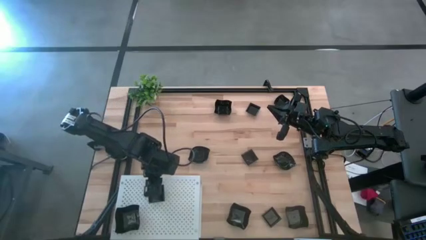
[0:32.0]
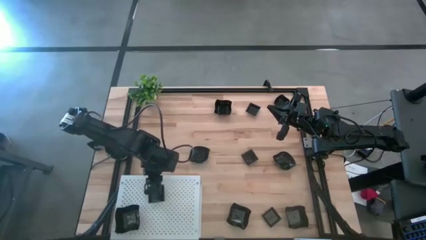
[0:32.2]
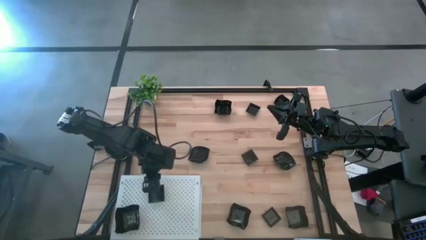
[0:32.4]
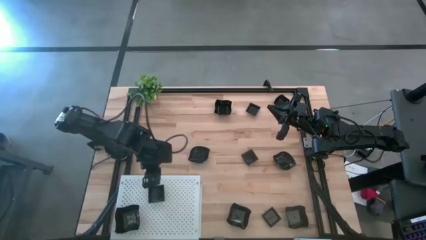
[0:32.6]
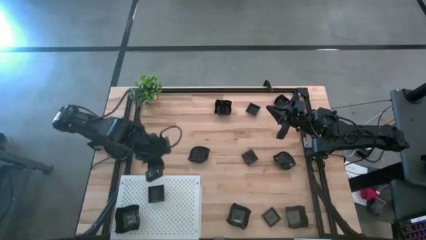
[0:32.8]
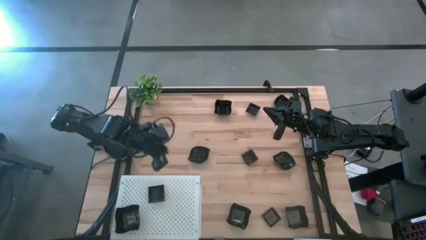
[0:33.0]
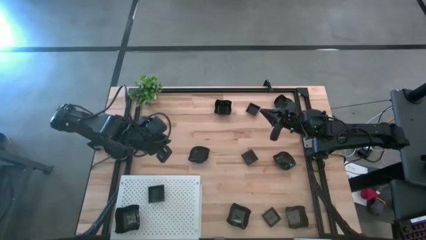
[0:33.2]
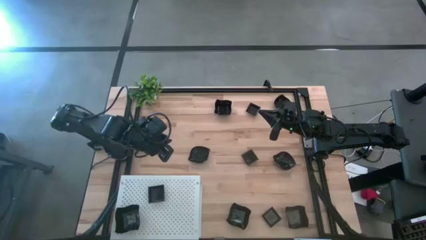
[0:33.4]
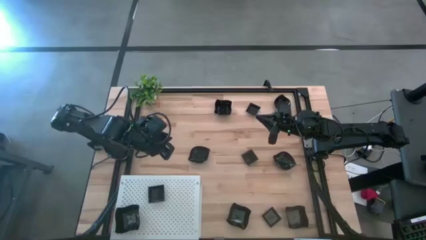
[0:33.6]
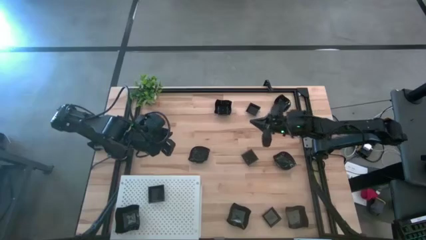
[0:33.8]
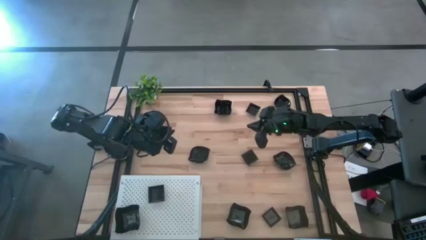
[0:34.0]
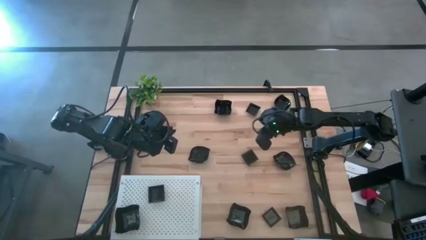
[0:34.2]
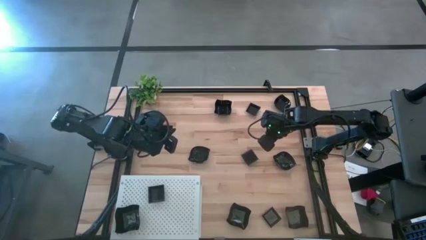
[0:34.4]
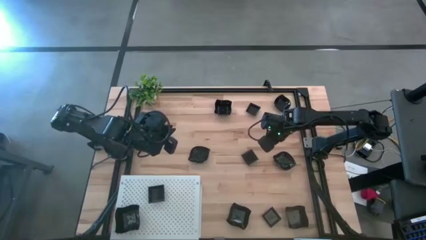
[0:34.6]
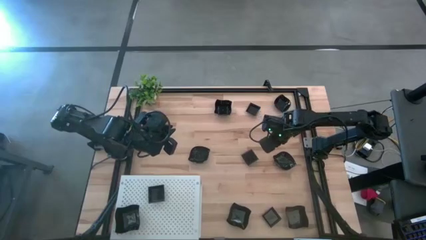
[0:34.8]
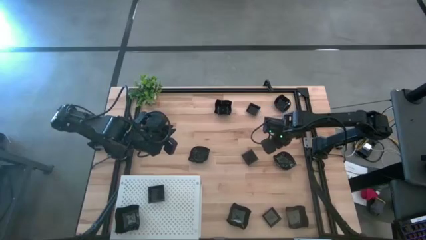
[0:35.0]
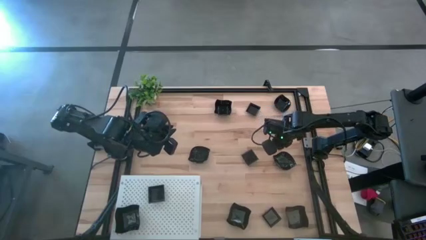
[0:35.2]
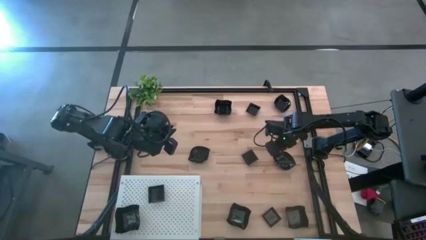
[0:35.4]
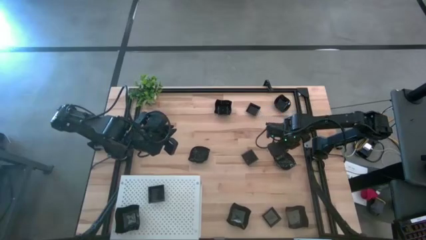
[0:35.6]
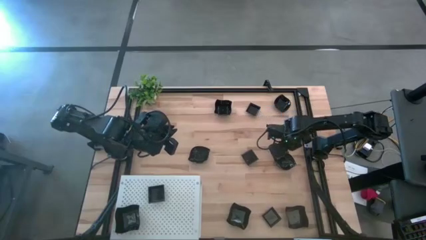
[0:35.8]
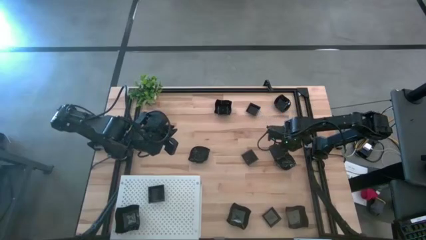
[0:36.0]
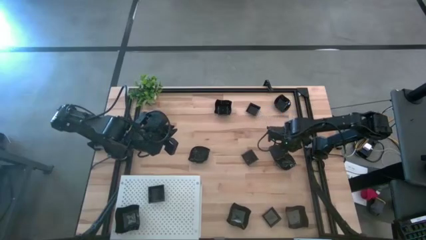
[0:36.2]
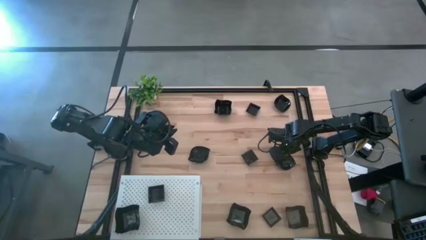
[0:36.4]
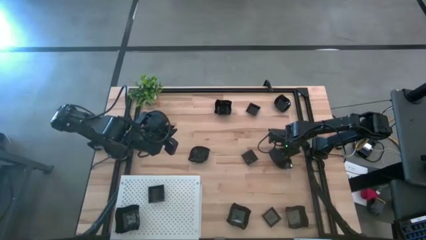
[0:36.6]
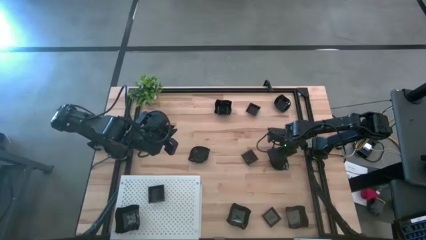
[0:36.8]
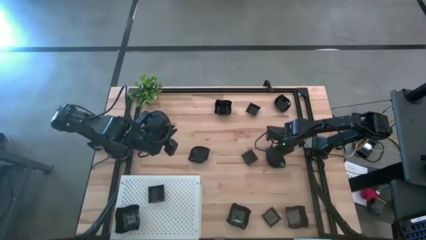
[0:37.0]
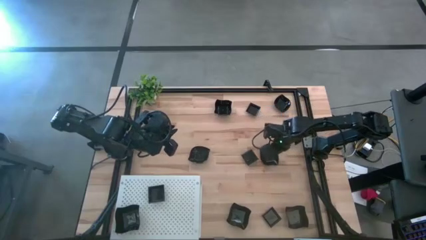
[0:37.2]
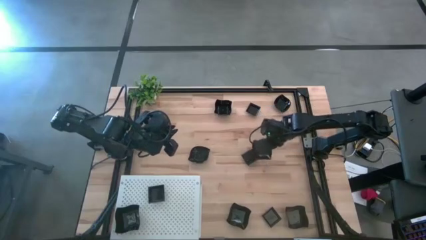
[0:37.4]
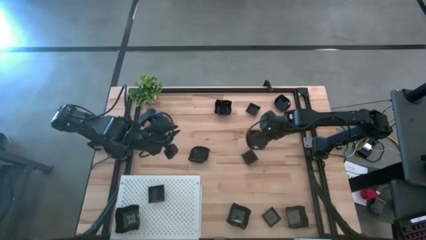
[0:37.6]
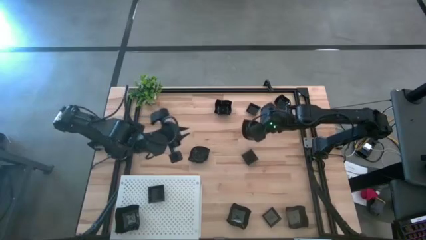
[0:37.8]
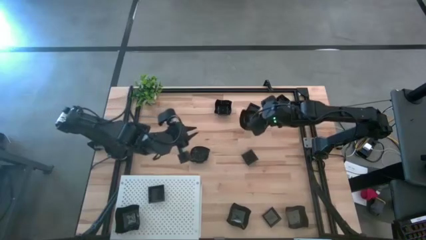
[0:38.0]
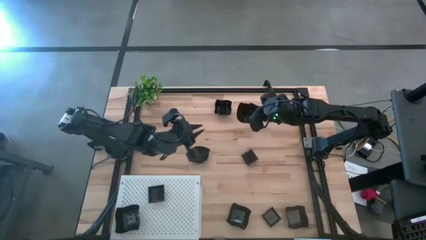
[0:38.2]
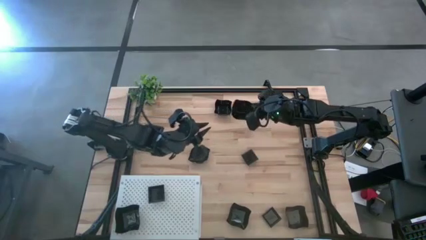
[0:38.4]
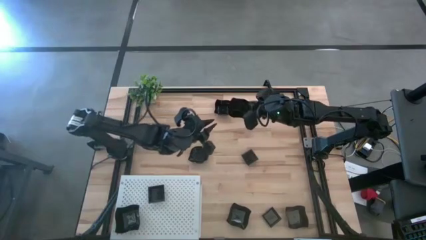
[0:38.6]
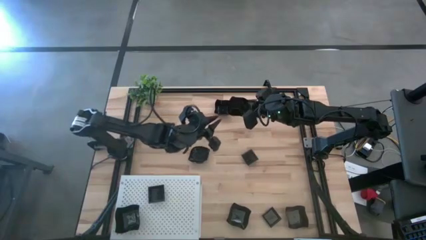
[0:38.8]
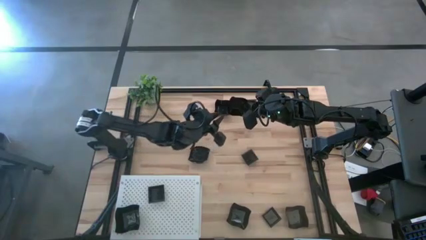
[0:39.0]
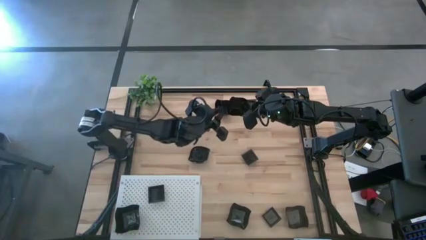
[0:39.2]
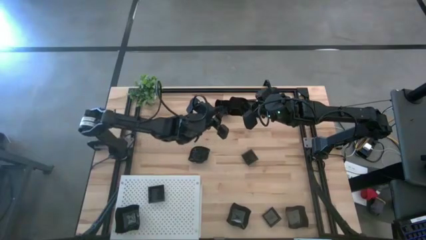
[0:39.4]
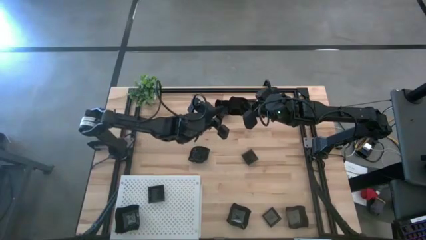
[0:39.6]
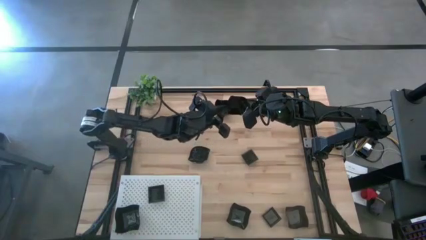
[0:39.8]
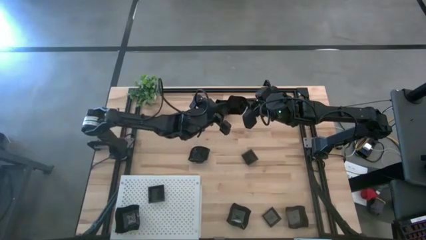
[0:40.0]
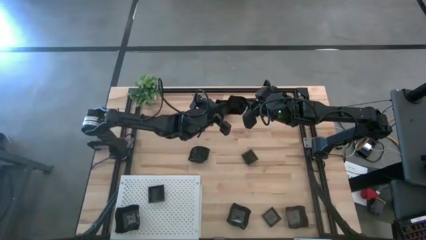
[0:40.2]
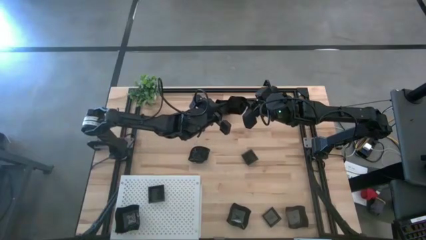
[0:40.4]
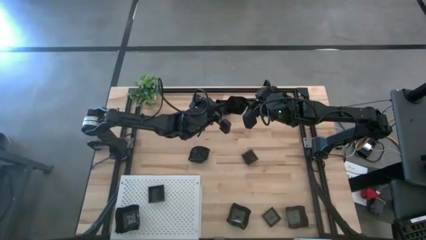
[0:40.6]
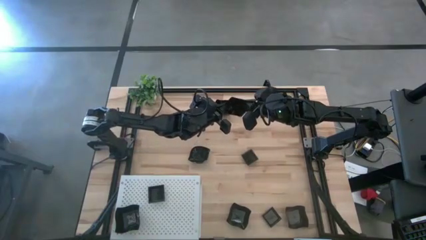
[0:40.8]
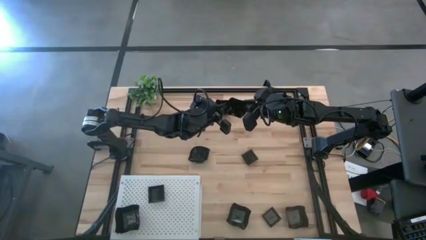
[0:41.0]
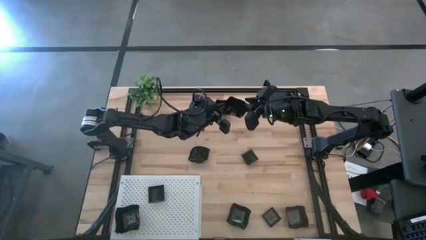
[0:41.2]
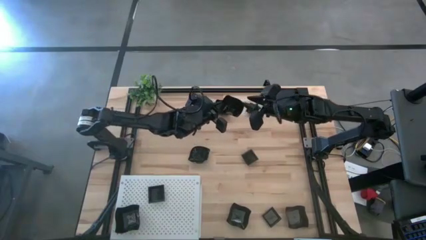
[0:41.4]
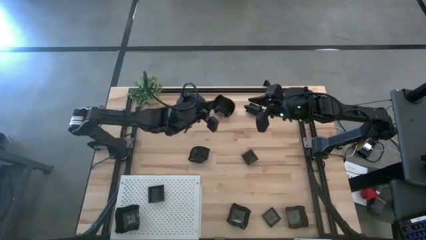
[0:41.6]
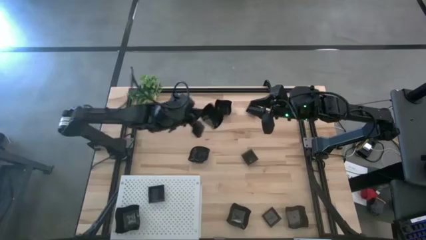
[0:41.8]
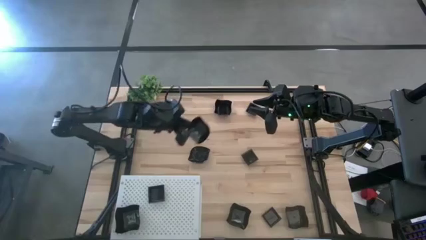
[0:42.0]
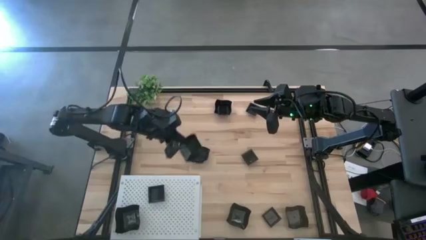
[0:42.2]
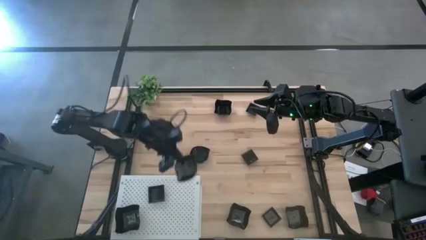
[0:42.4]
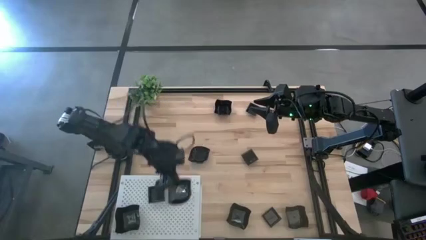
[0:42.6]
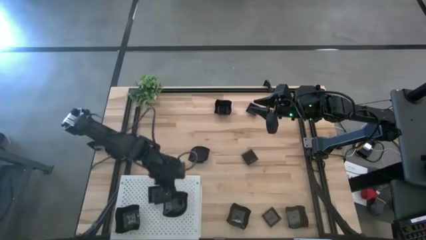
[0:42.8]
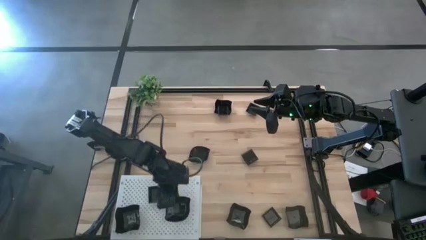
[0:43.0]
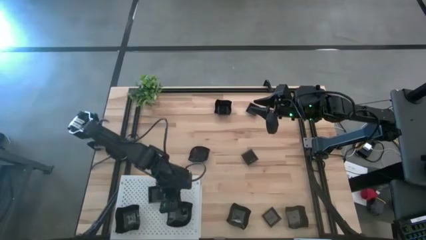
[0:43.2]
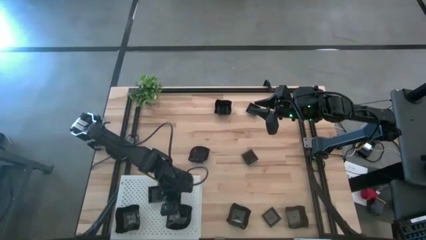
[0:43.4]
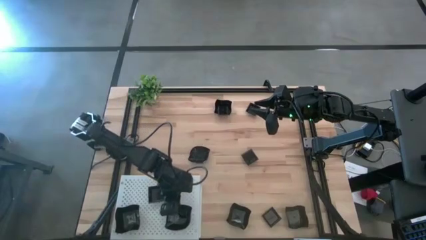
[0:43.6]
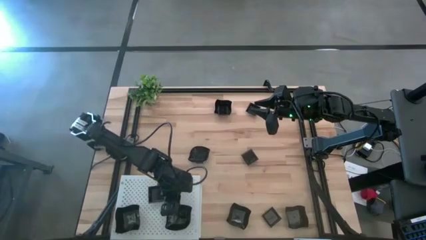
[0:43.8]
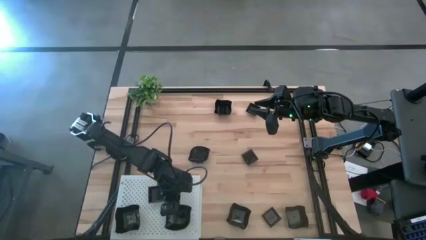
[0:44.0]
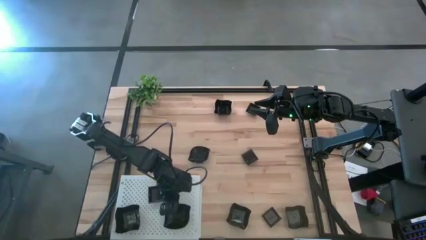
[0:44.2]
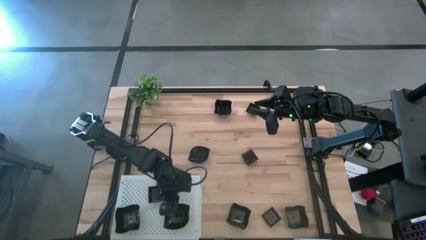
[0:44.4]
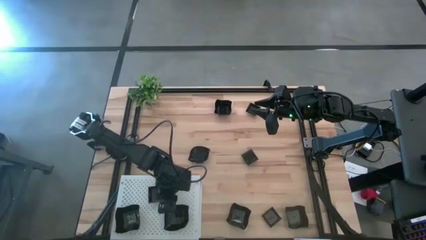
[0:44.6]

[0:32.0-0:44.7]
Task: Pick & Place Mini shaped plates
Put the leaf shaped plate on the shelf
